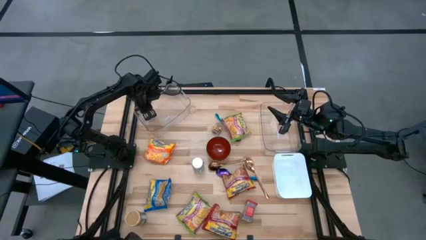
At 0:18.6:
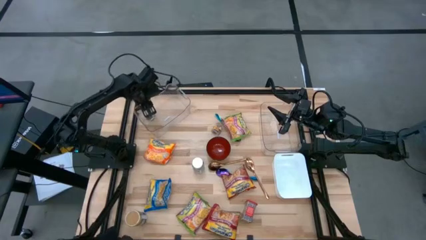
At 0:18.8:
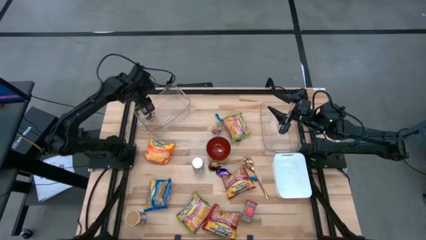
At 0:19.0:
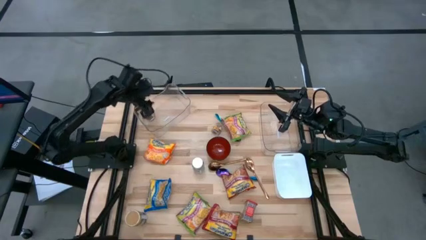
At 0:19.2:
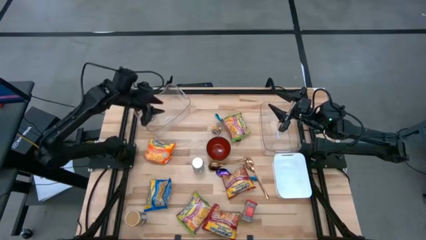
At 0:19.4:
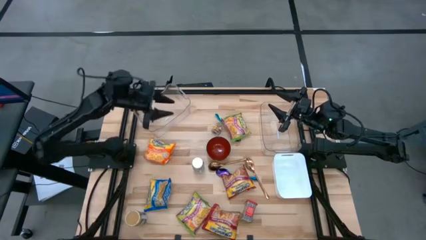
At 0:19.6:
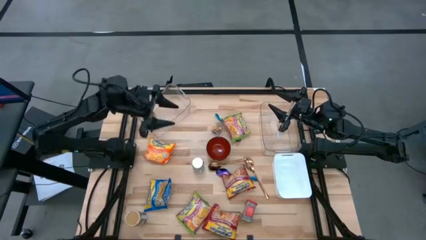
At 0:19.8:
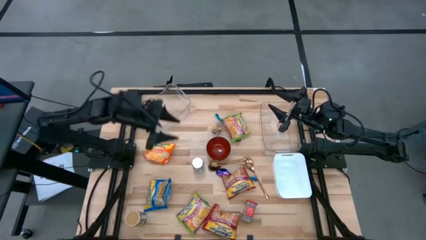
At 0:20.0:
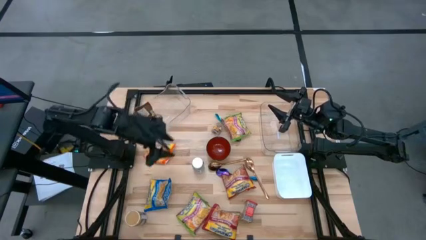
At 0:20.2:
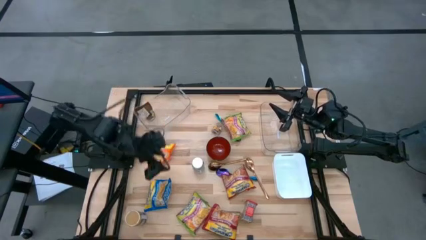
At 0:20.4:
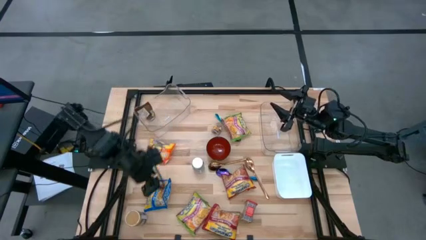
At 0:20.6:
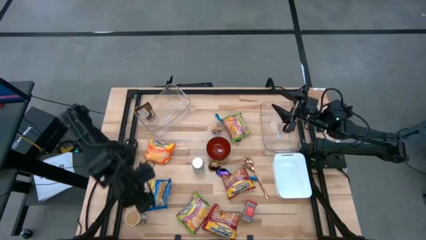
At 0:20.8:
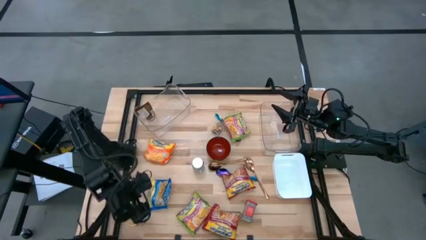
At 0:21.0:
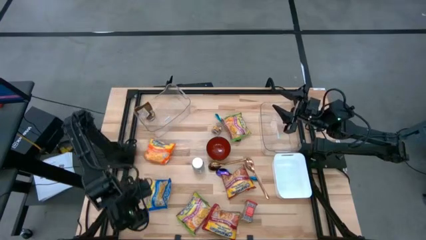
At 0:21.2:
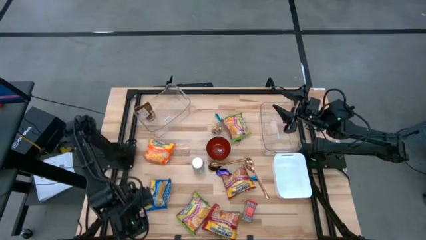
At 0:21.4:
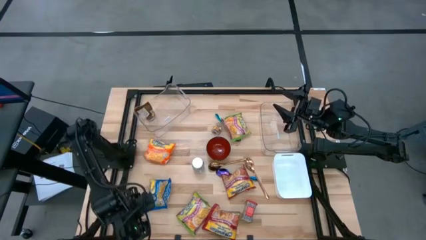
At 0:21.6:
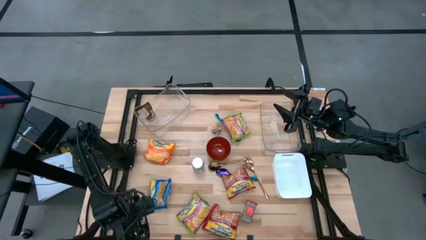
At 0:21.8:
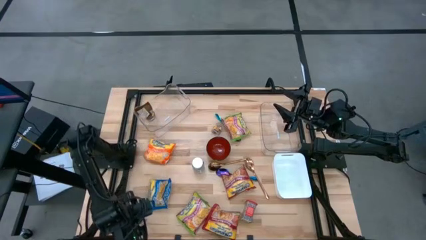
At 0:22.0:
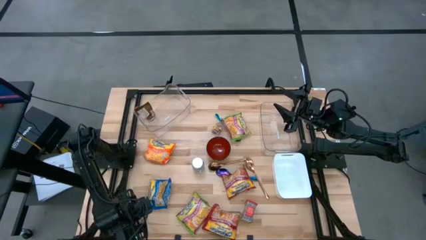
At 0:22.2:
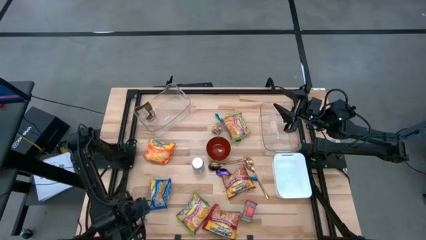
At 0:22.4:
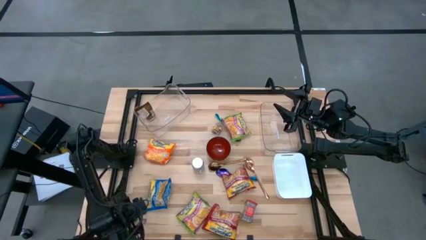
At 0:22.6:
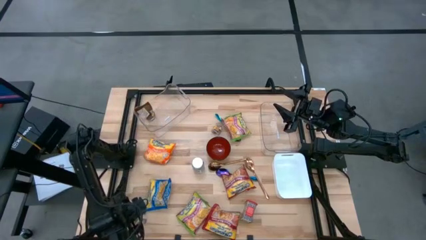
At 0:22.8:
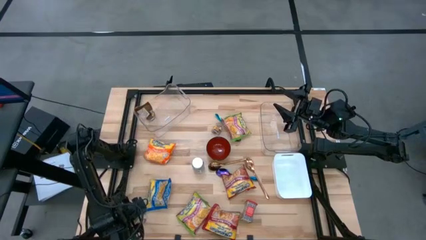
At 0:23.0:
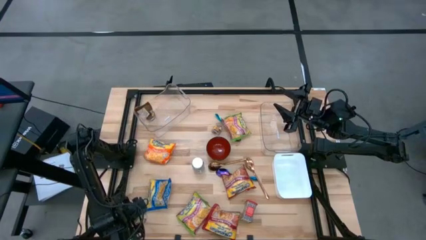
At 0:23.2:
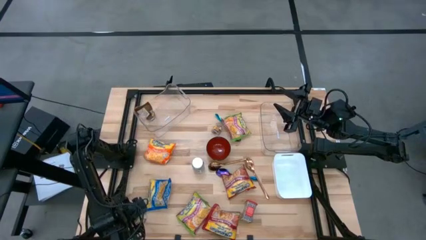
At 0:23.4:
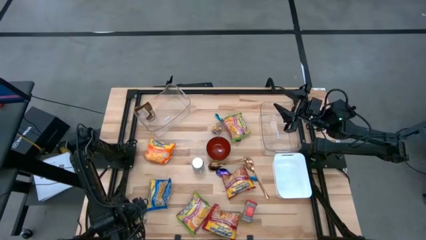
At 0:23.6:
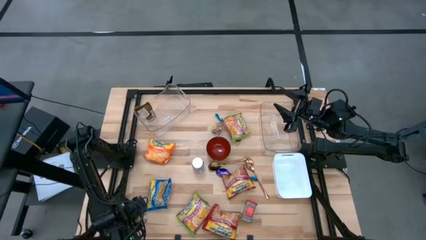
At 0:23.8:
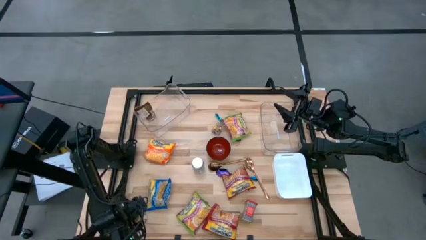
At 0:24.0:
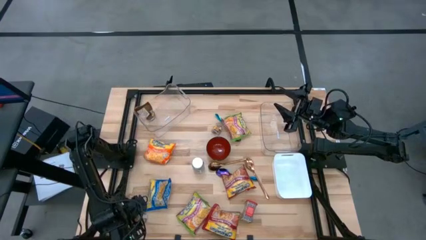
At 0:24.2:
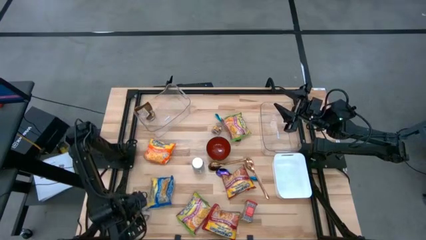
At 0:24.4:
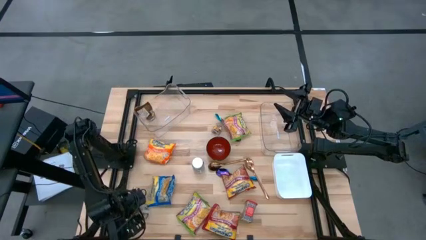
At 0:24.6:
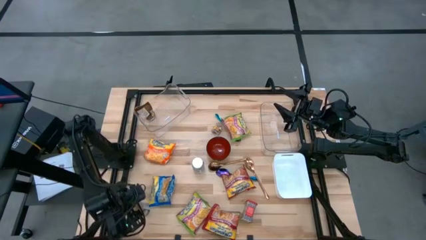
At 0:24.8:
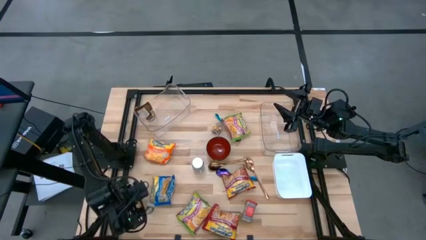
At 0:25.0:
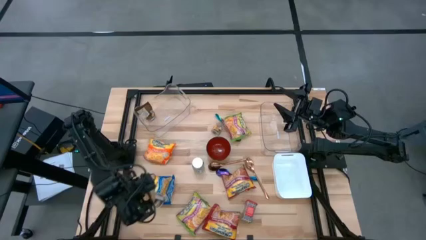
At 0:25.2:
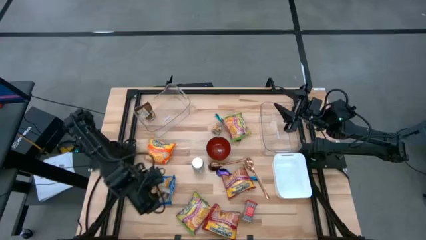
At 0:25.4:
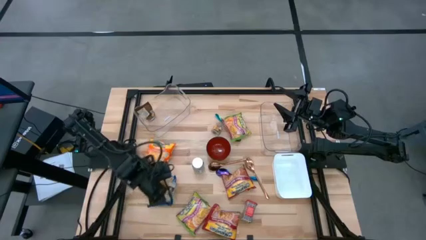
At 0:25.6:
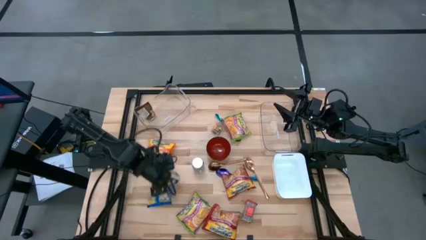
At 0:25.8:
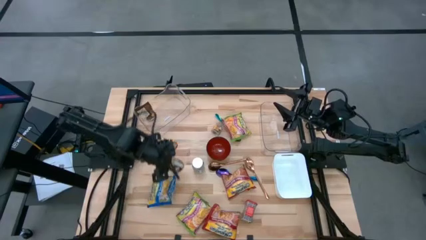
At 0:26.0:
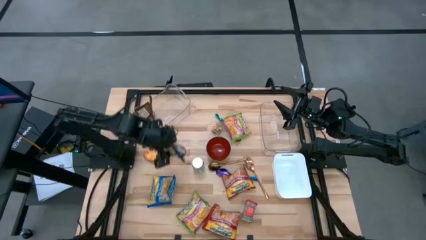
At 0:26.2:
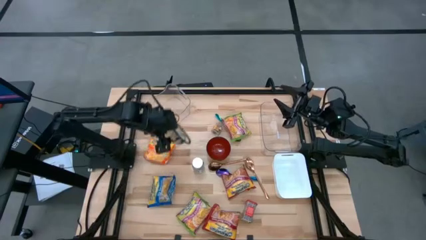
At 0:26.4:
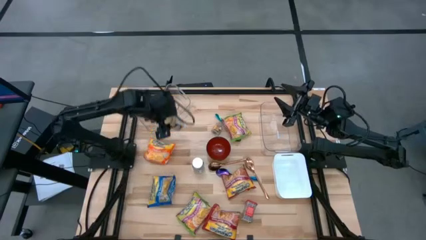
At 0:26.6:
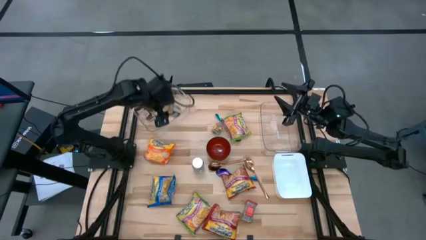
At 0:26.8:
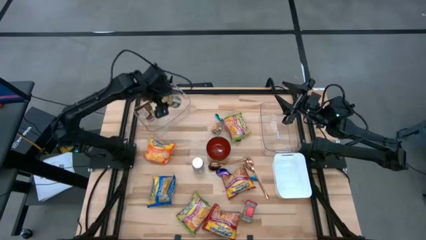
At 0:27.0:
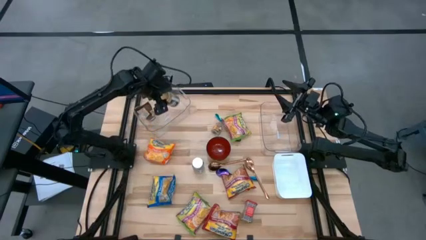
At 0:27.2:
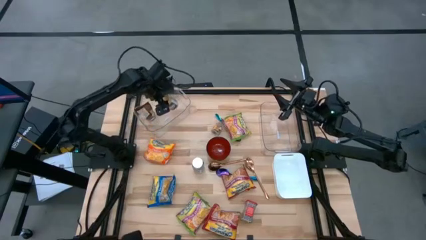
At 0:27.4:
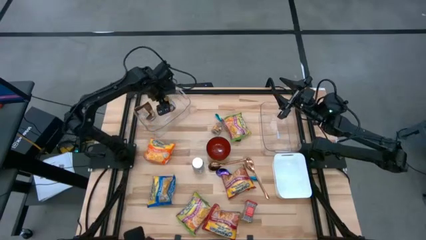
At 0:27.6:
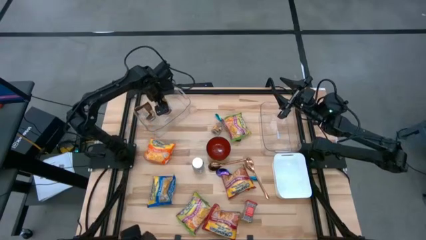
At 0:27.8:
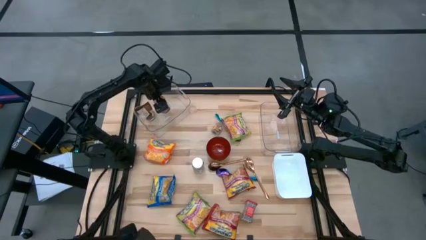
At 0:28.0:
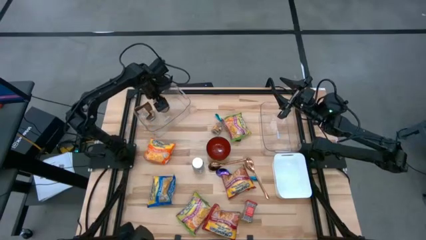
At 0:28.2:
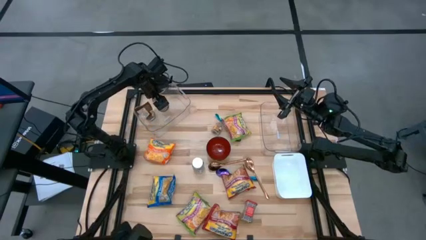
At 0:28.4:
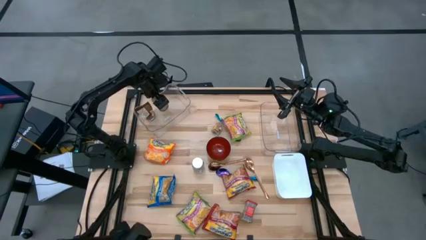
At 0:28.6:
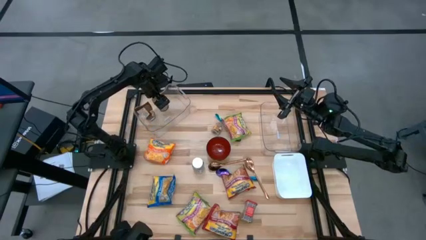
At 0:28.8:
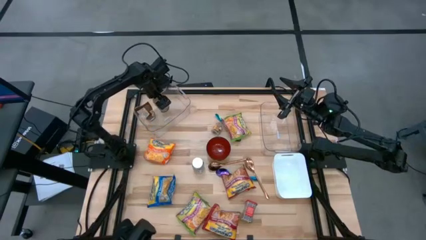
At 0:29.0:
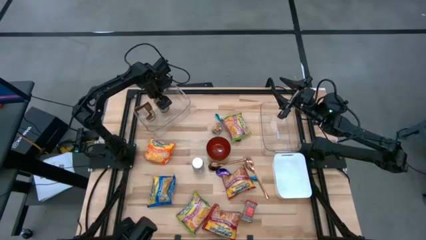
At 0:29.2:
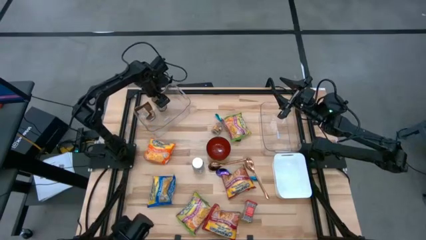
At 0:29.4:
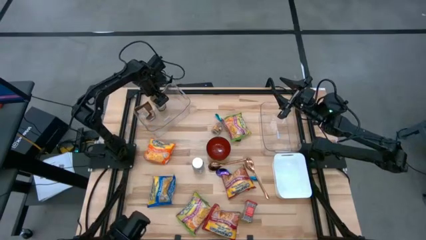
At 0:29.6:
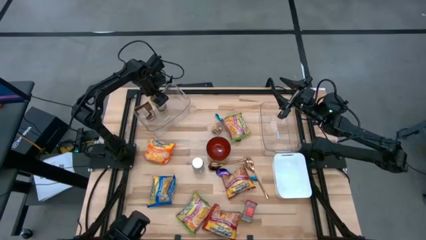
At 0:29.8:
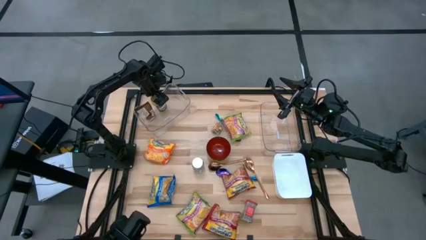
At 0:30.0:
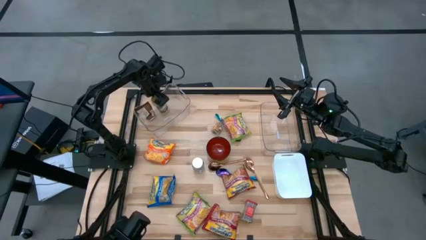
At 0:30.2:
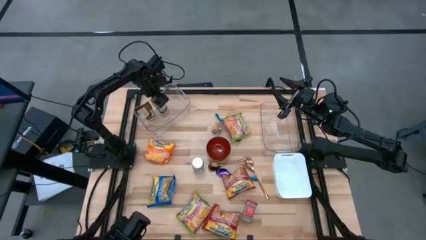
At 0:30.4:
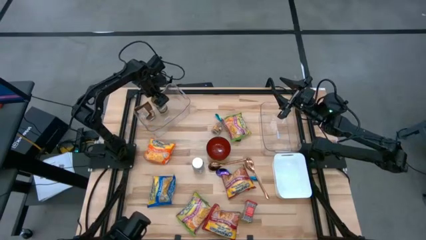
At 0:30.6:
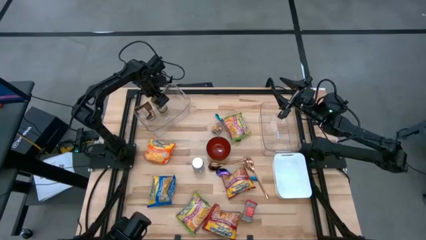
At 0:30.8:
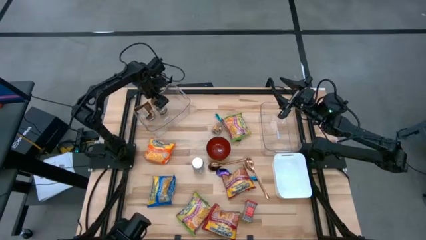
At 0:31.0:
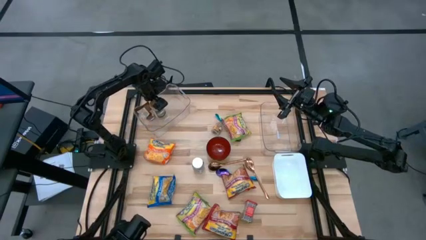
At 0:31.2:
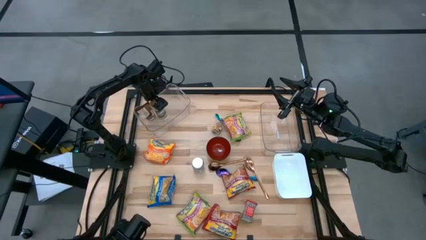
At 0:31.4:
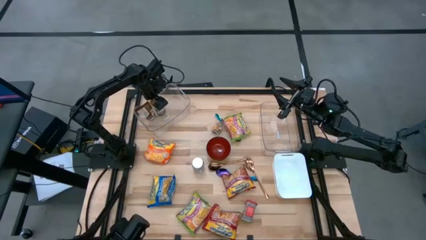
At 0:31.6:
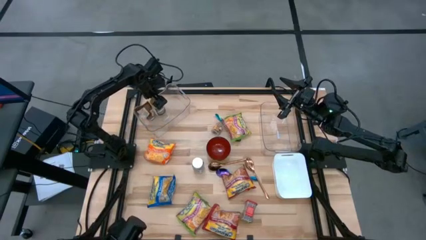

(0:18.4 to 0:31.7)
Task: Pick & Place Food Item
Put the gold seasoning bottle into the left transparent bin

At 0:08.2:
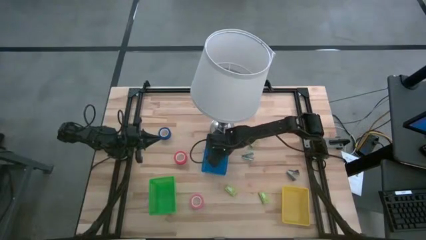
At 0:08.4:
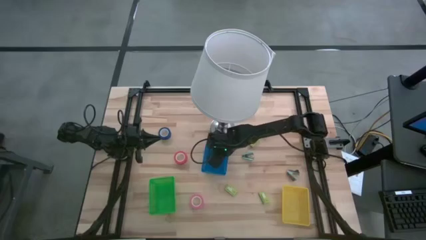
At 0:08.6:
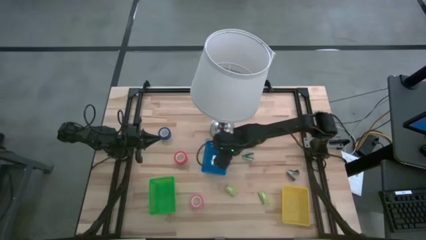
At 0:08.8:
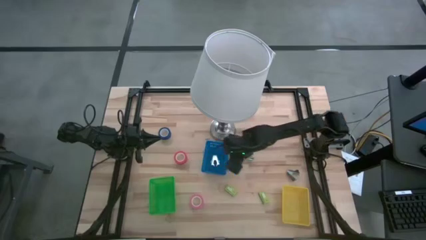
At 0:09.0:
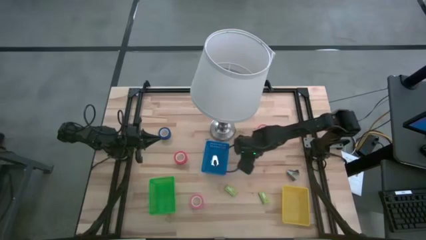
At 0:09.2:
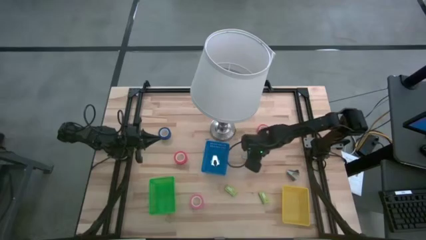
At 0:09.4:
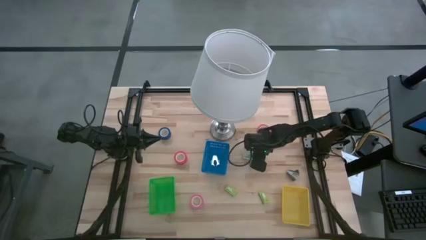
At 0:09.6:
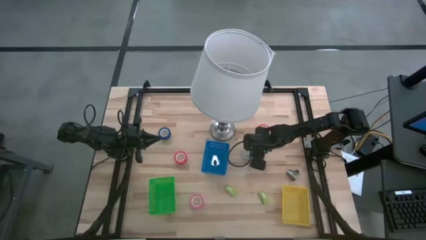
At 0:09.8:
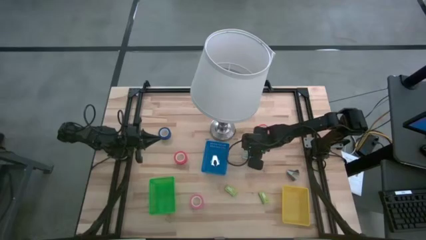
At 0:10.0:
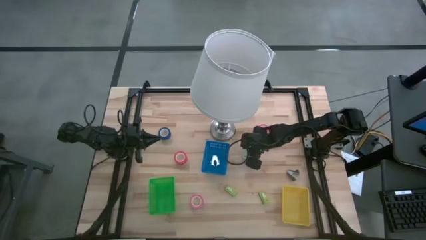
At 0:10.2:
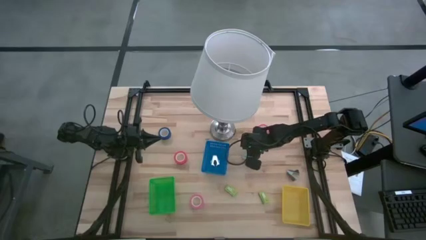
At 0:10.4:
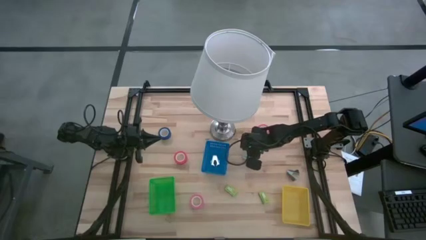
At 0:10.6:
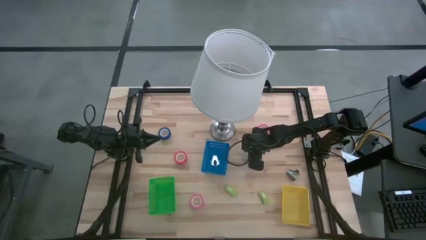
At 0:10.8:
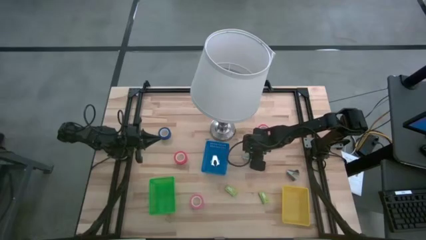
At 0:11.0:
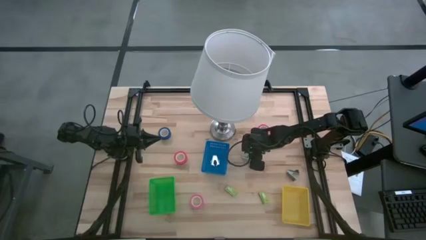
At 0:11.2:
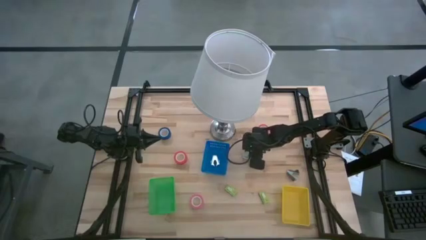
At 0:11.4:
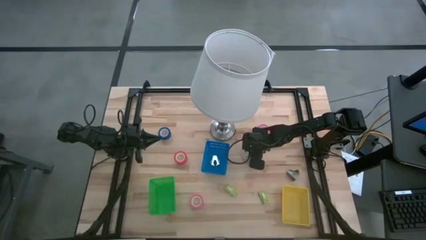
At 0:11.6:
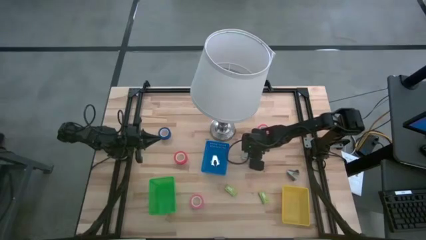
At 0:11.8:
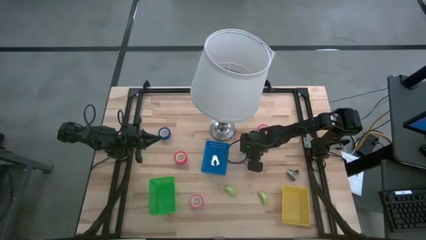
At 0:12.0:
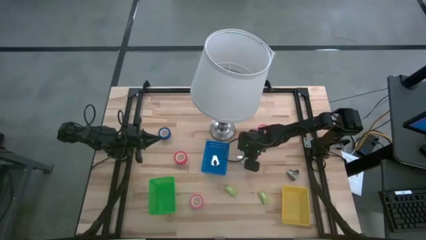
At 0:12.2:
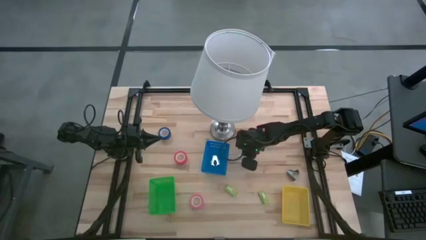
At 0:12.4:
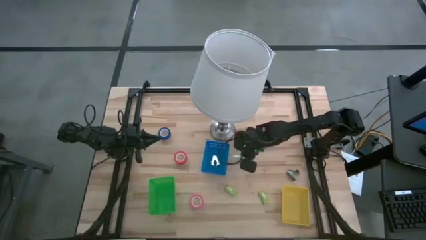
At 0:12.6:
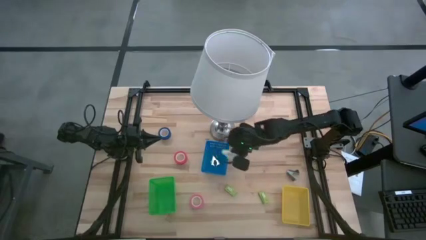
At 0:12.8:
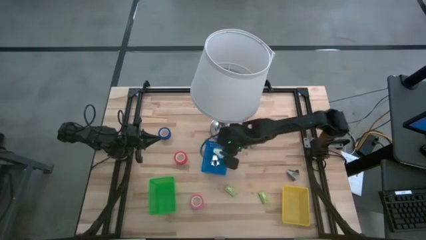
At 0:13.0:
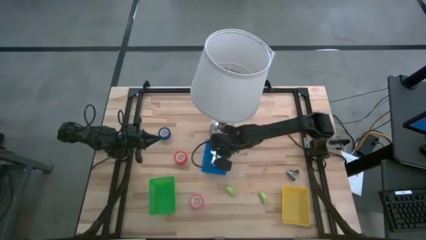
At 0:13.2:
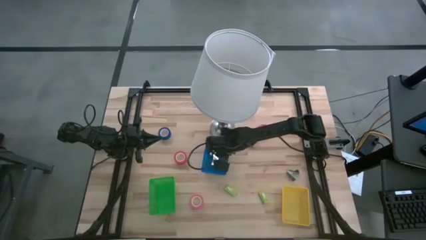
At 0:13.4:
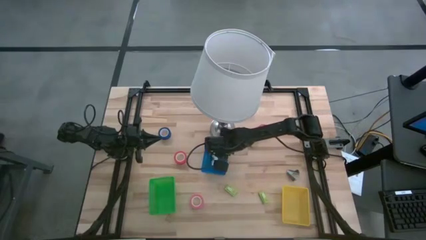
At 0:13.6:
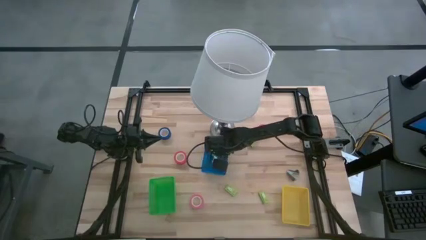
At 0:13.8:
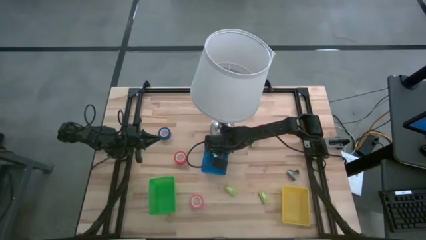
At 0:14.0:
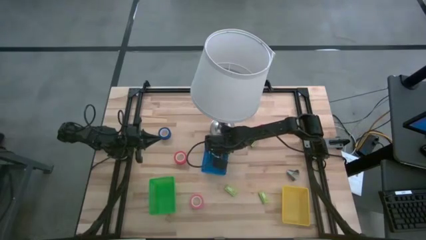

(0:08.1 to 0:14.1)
Task: Pick and place Stapler, Stapler remover, tape
Put the blue staple remover into the blue bin
